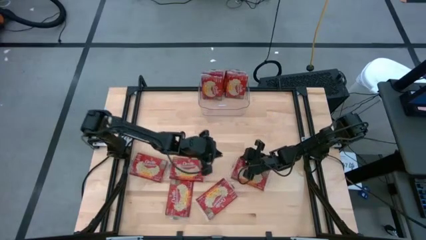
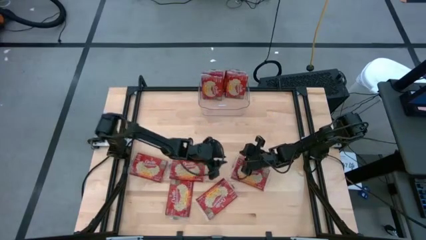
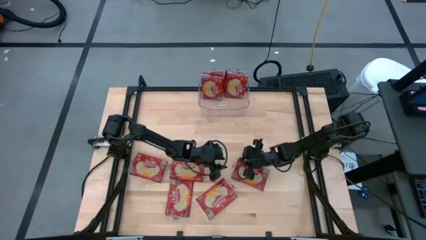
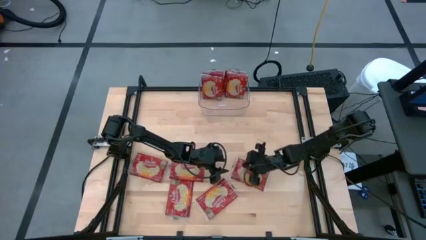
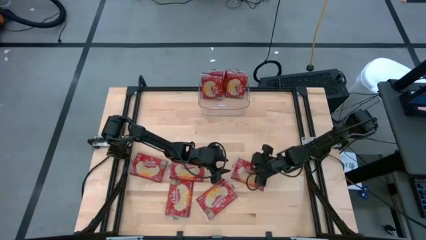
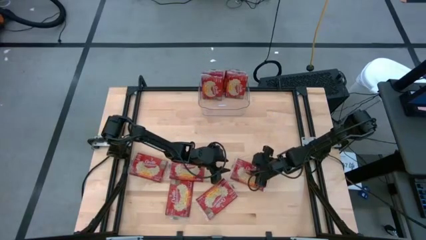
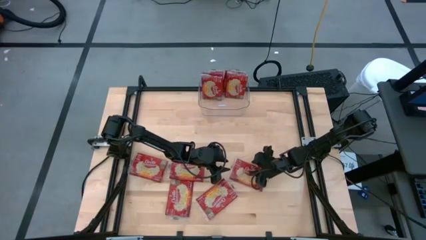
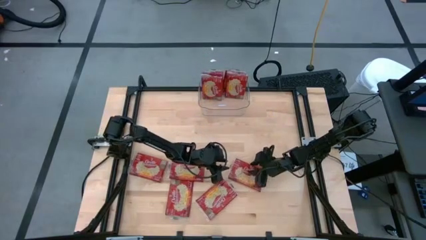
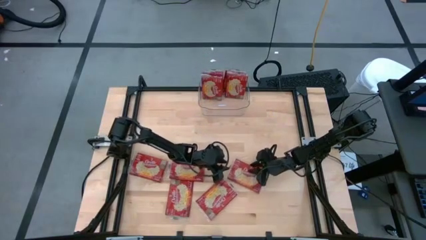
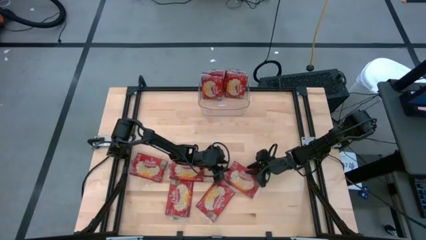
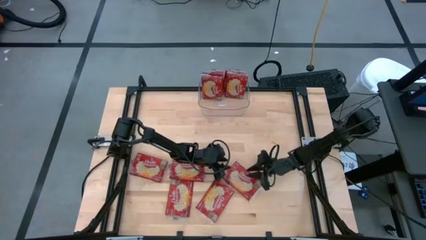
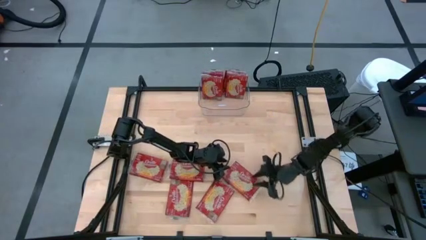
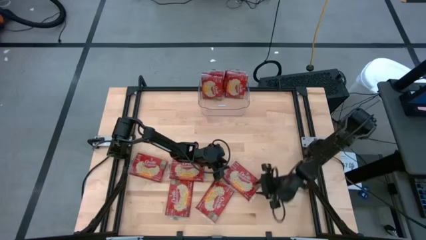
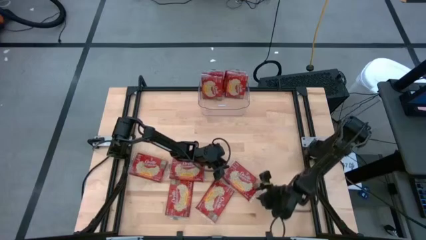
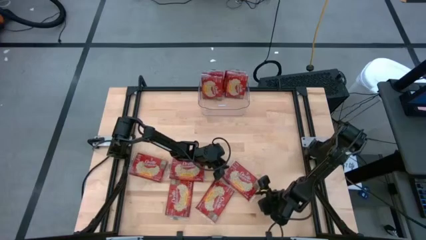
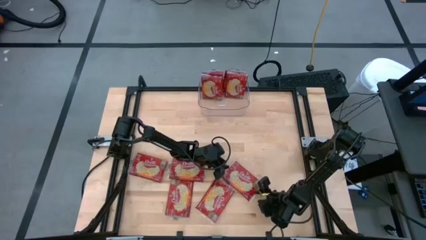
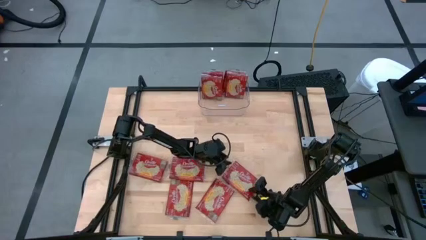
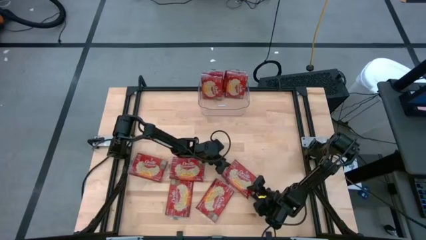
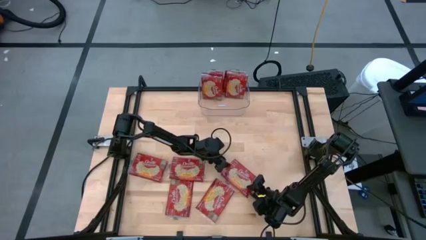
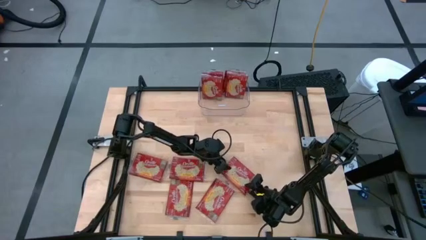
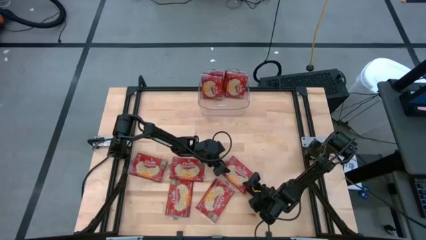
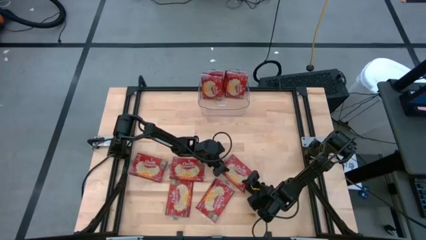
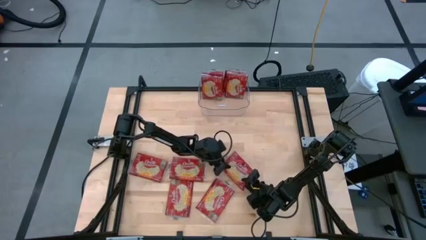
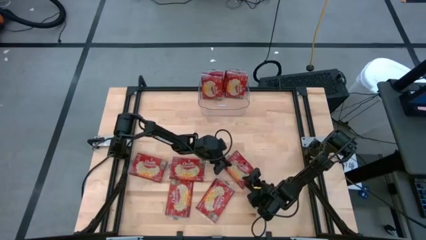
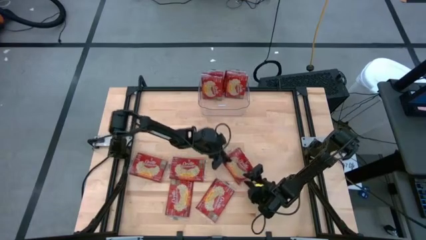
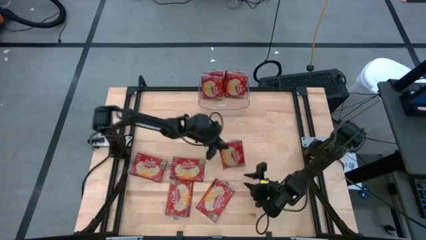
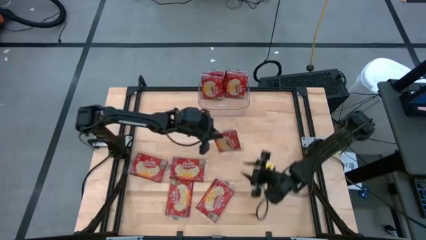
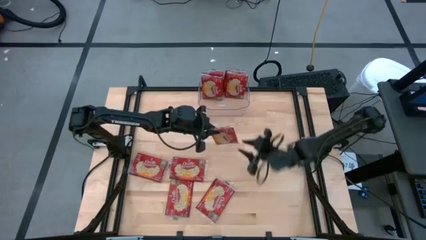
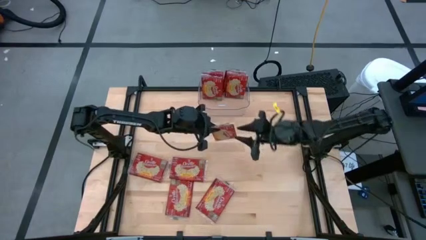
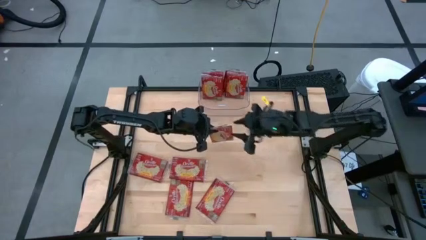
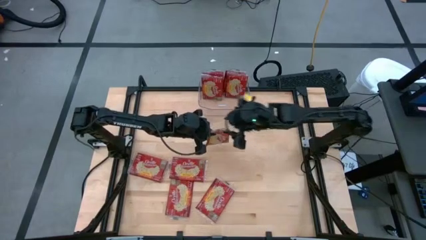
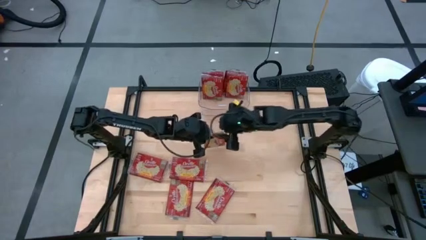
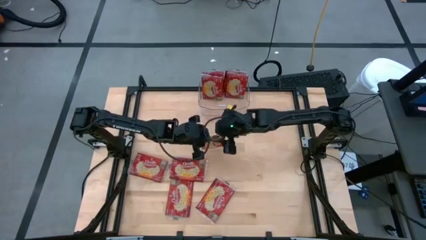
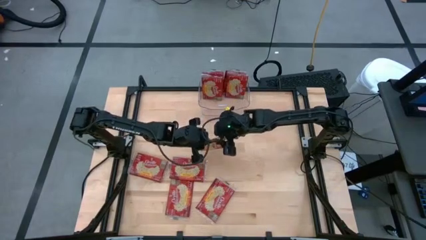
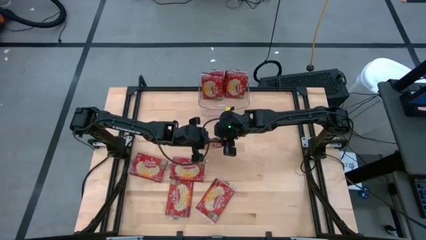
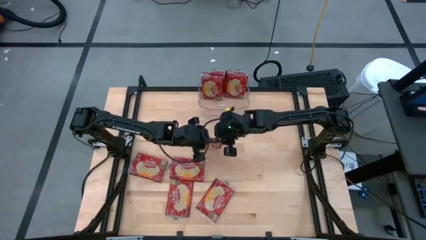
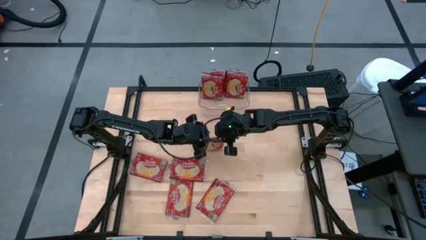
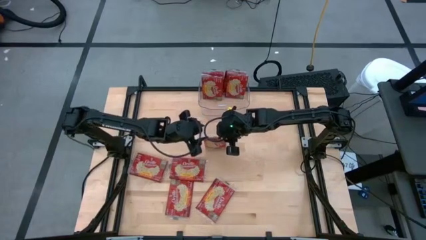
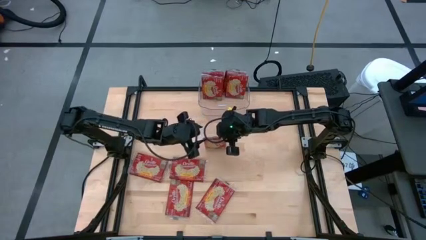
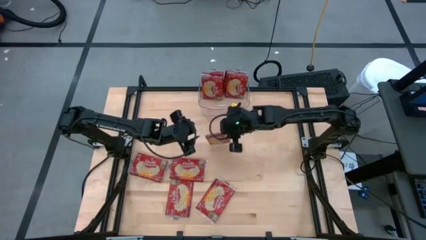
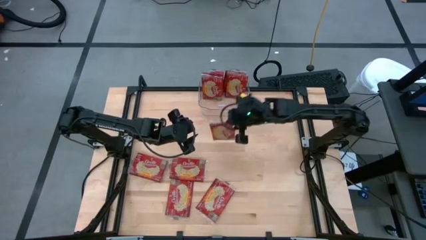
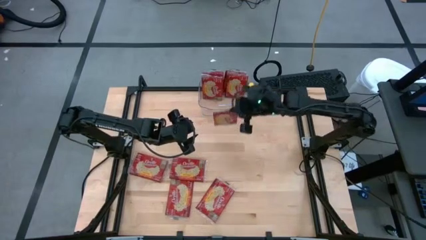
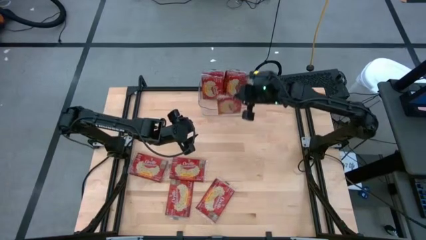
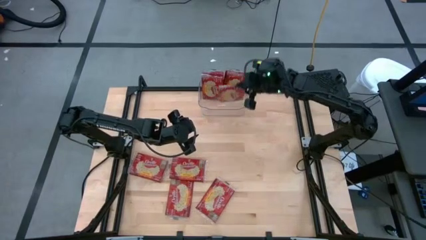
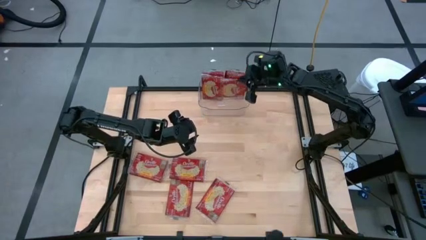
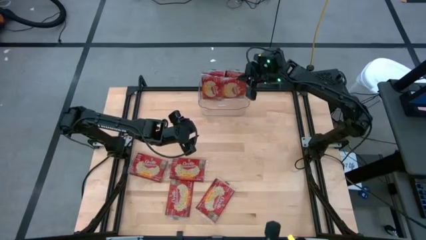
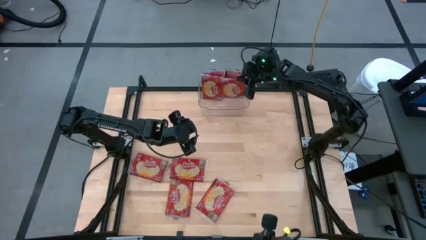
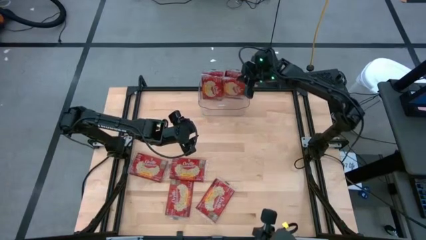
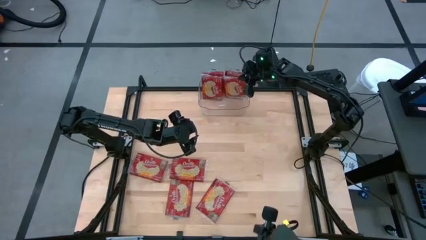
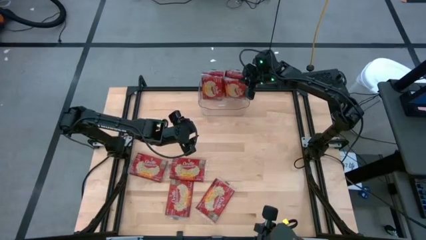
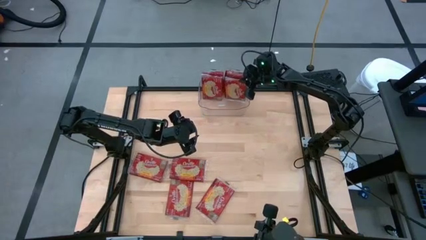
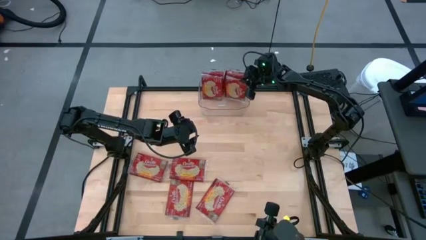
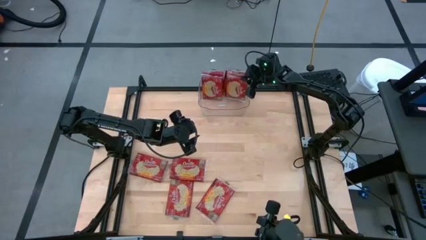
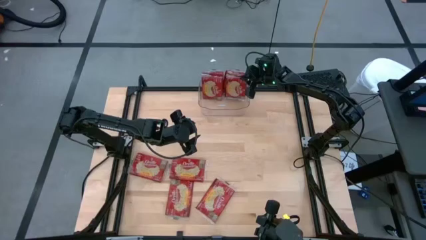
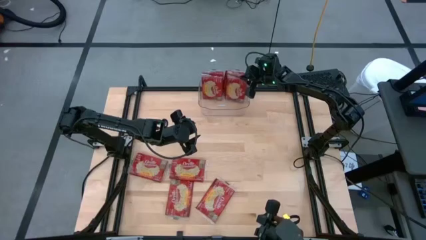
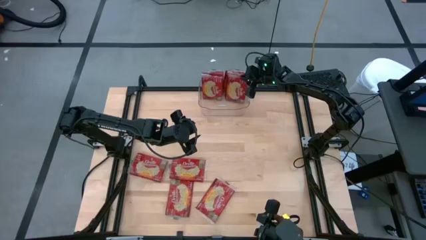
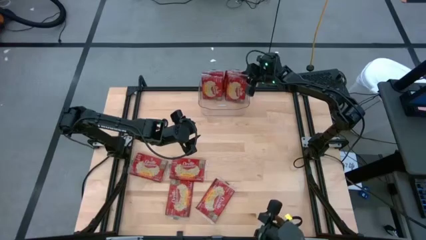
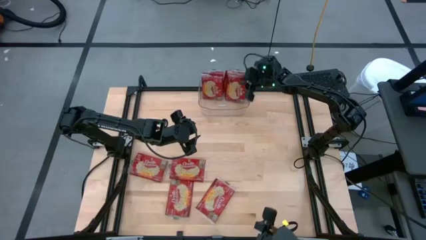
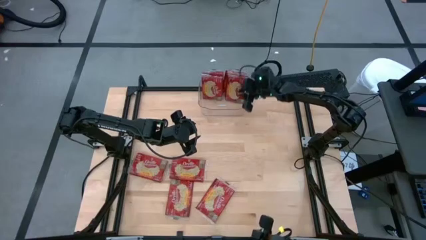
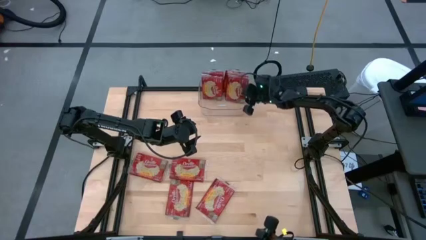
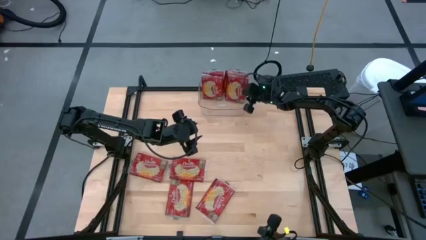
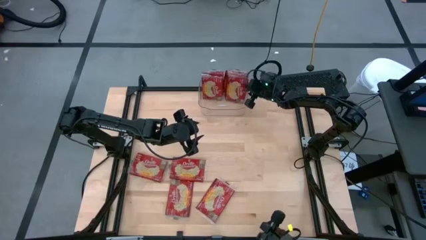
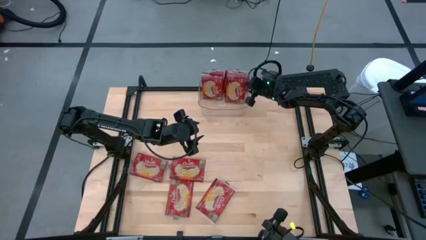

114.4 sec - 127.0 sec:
Task: Sort popcorn bags into baskets
Put the red popcorn bag into the transparent bin

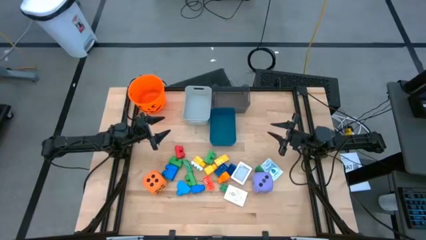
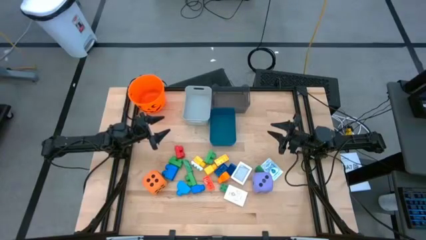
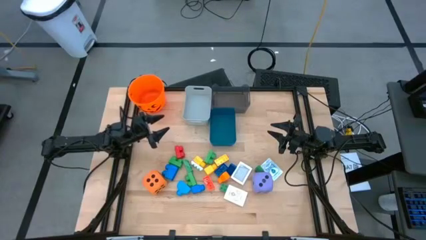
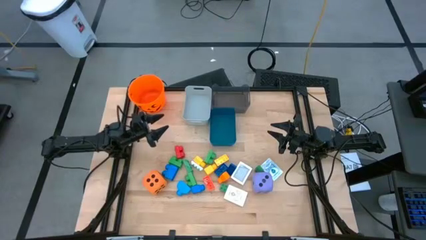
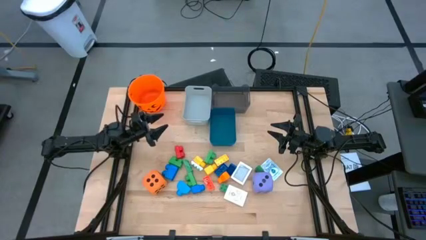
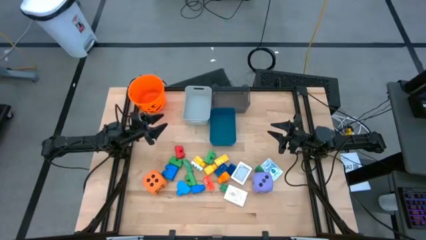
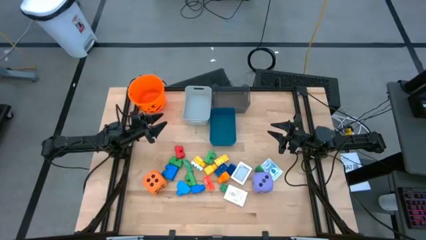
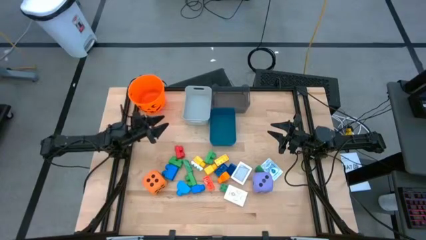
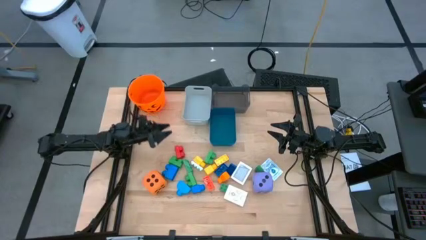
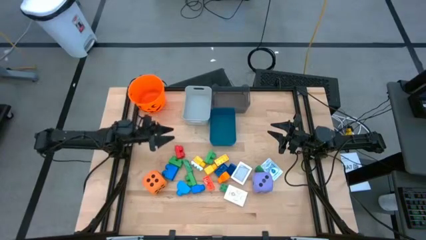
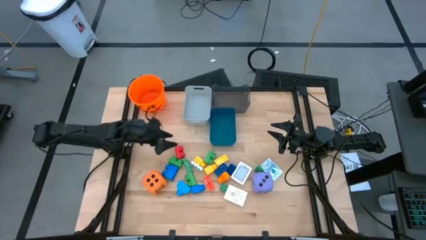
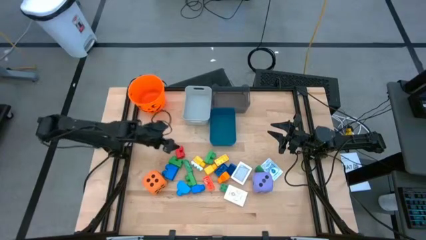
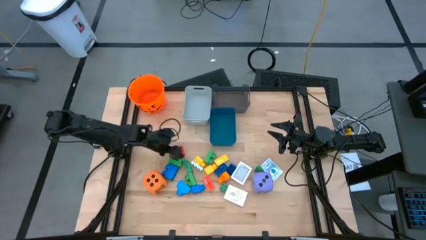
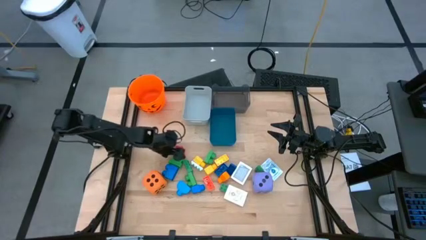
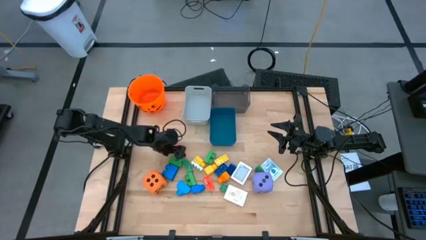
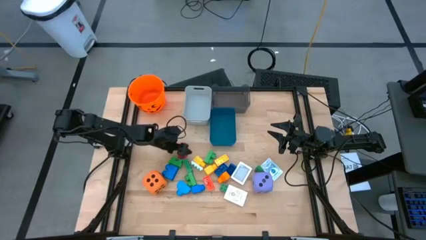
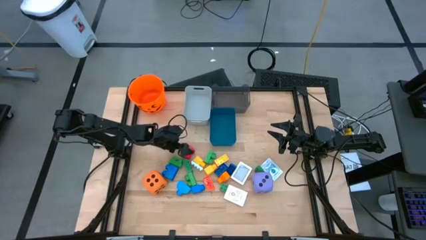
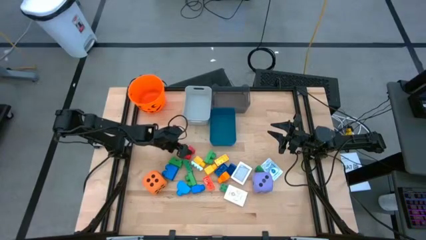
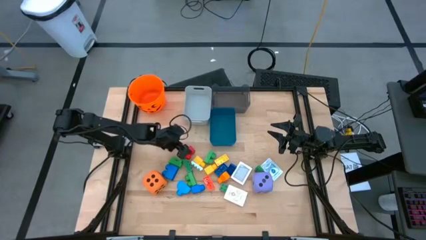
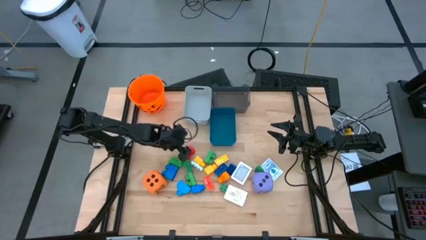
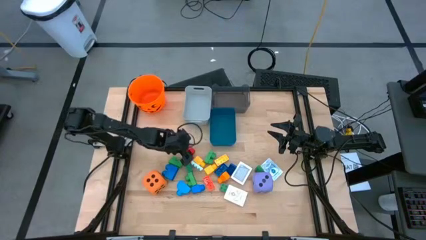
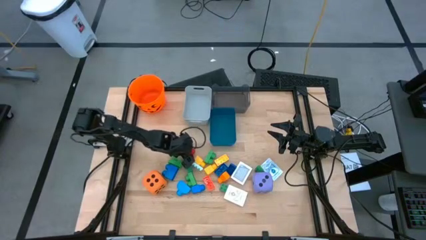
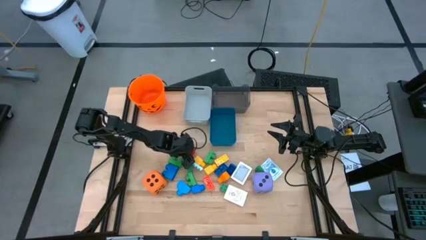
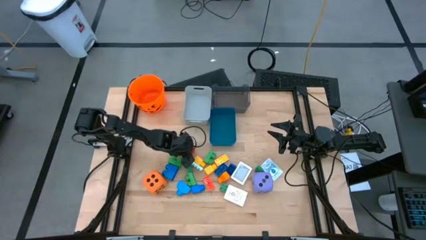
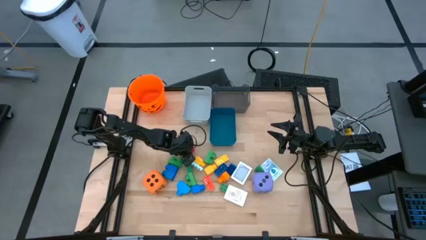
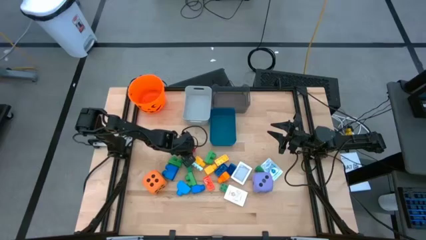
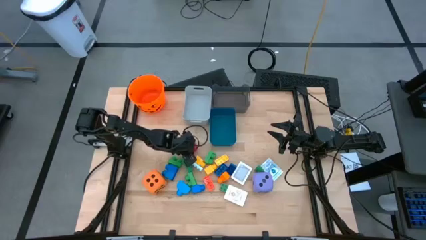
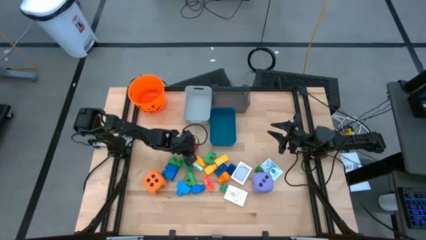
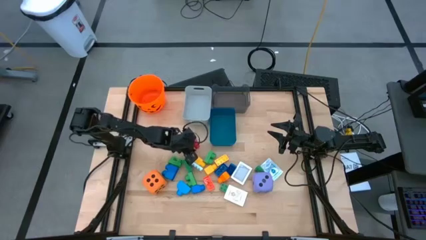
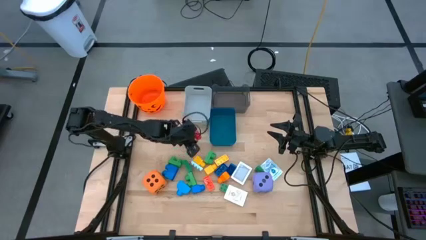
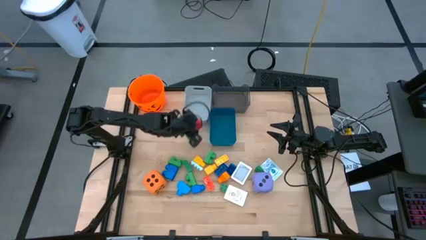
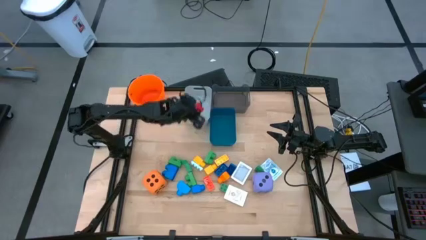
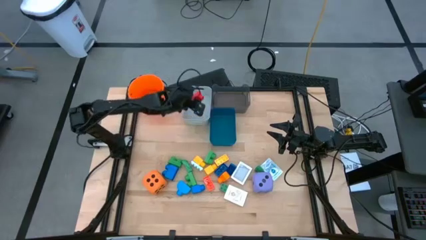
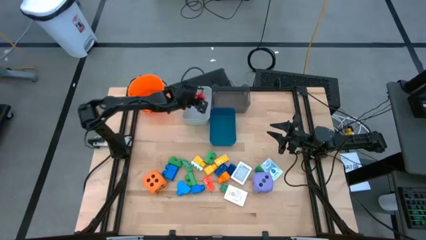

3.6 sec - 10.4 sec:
Task: Pick & Place Toys
Put the red 2 stud gamepiece into the white bin
